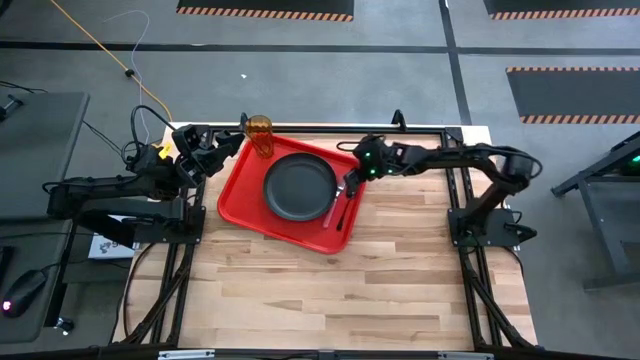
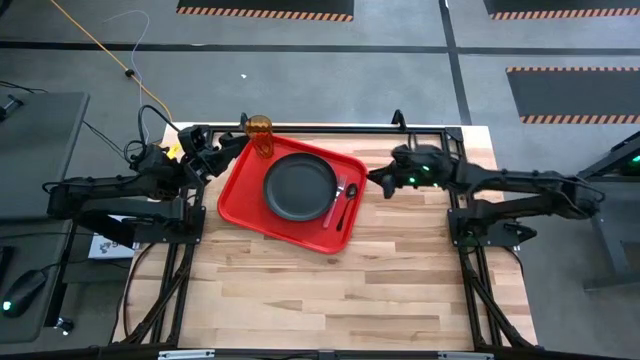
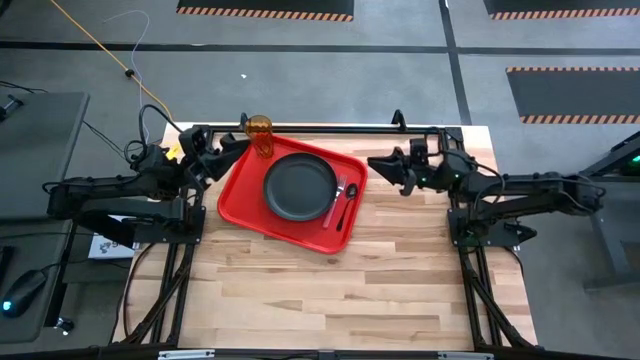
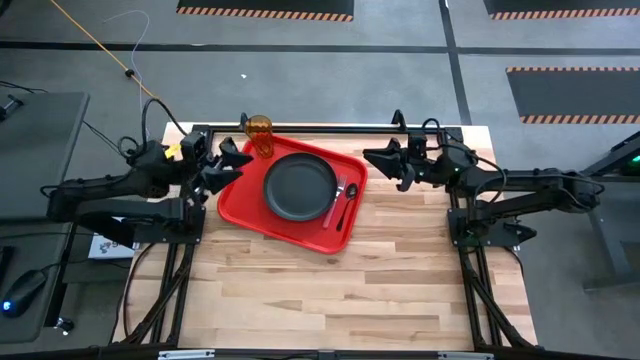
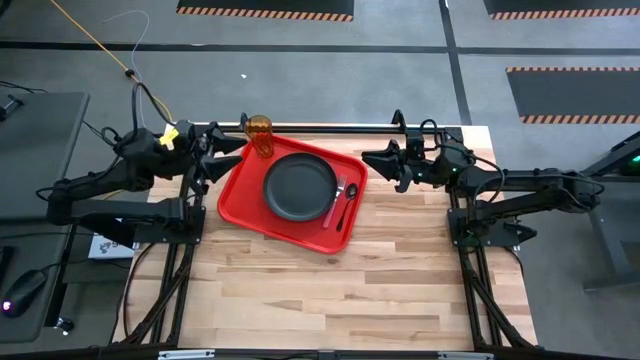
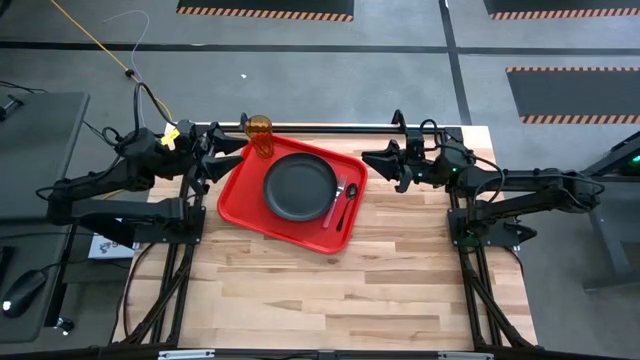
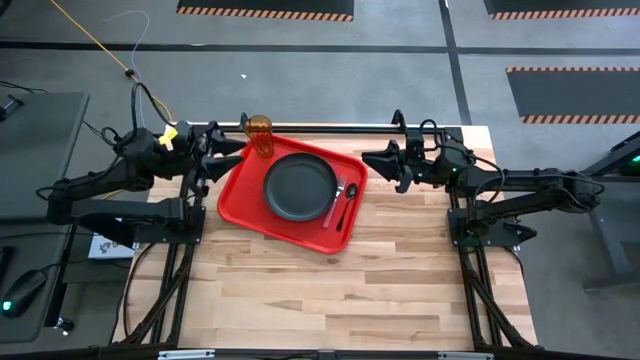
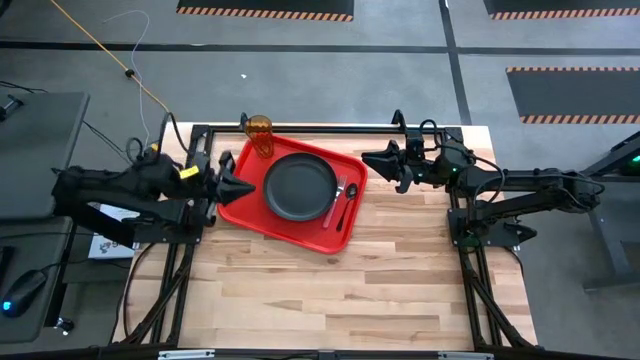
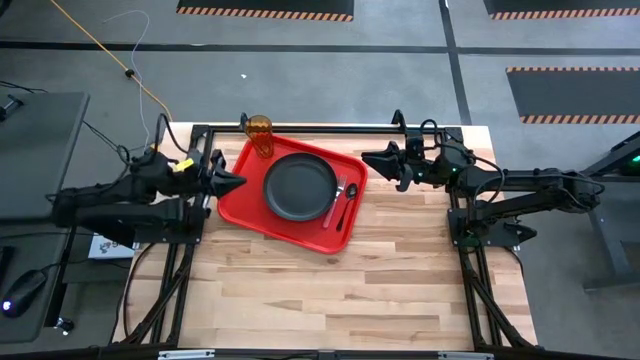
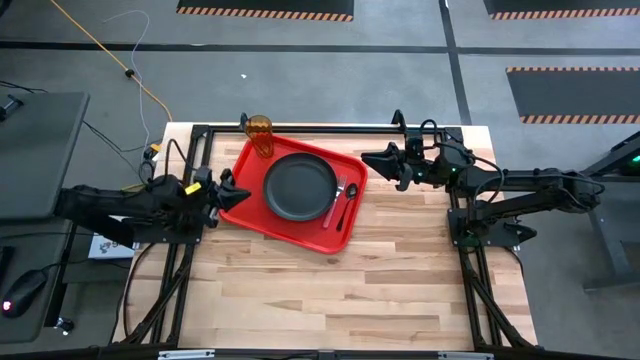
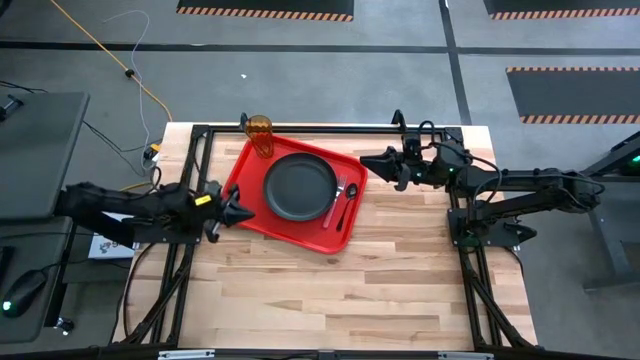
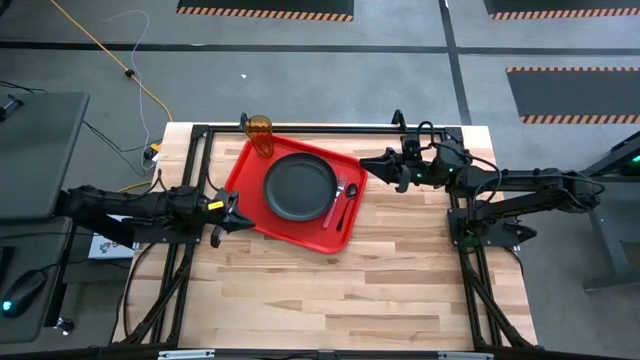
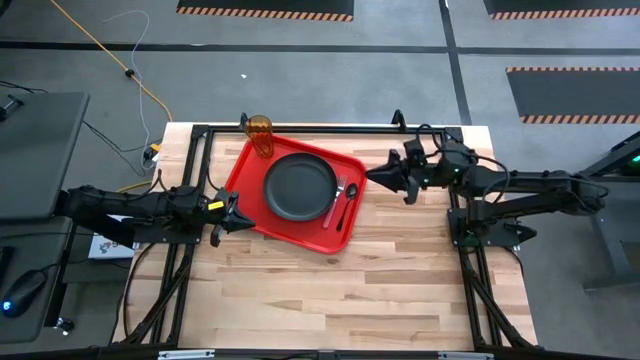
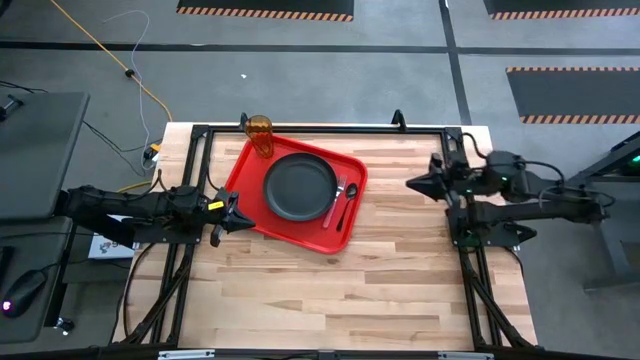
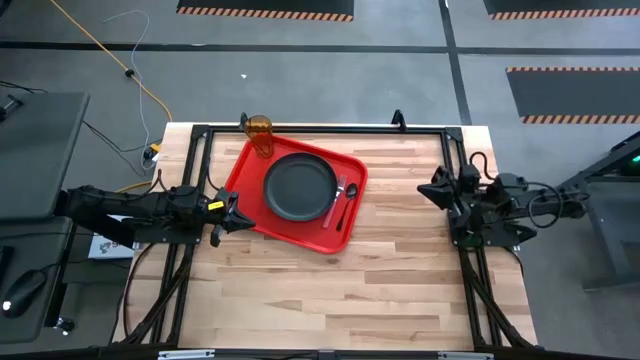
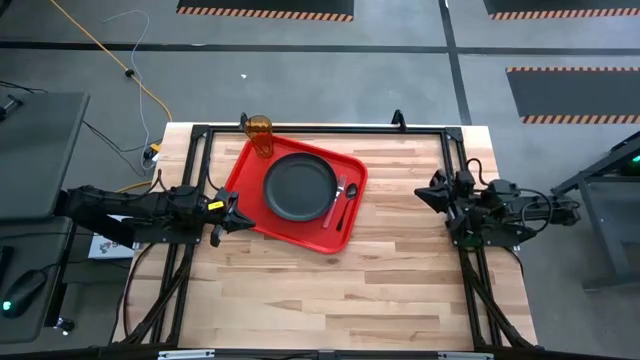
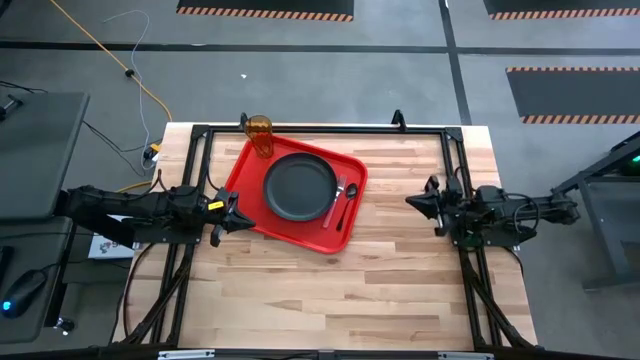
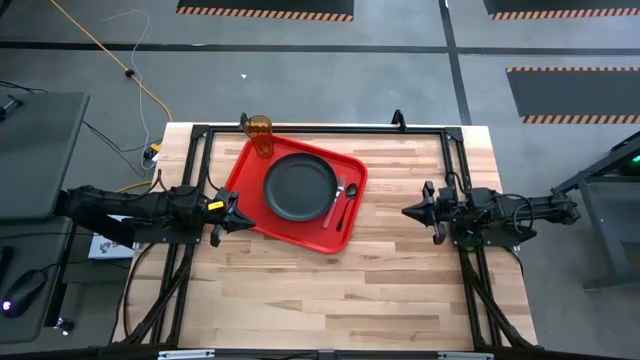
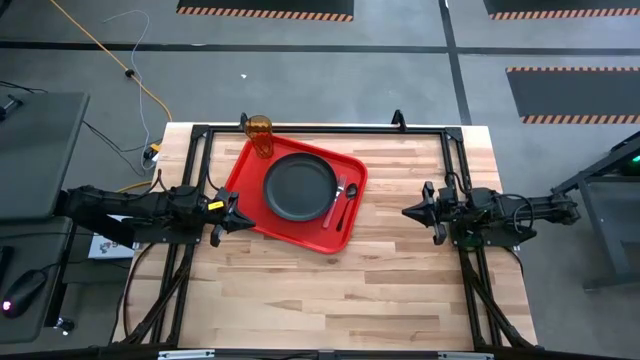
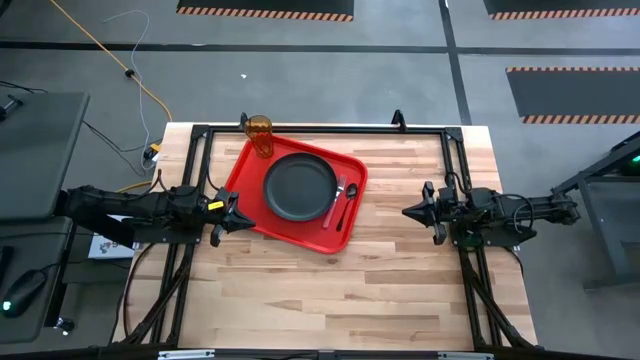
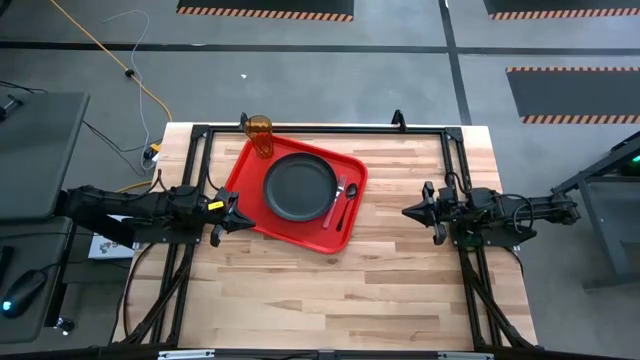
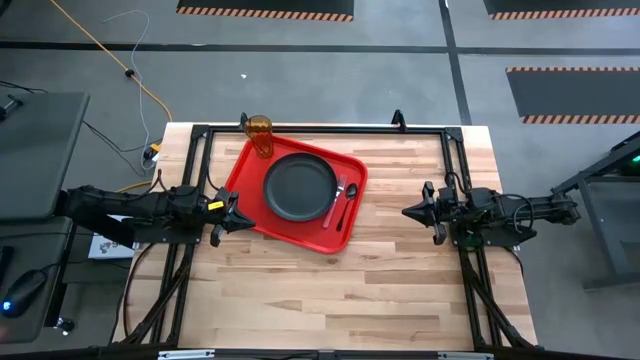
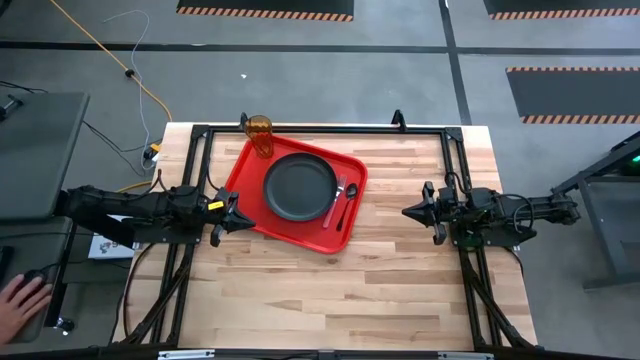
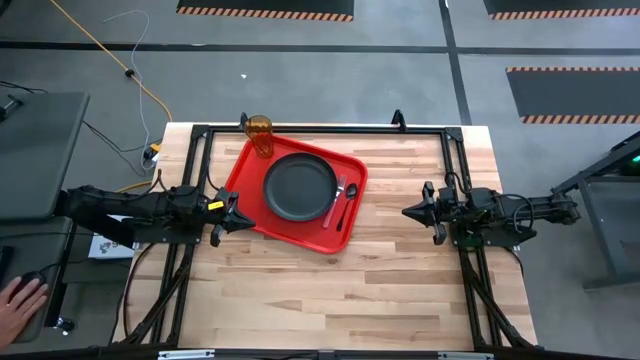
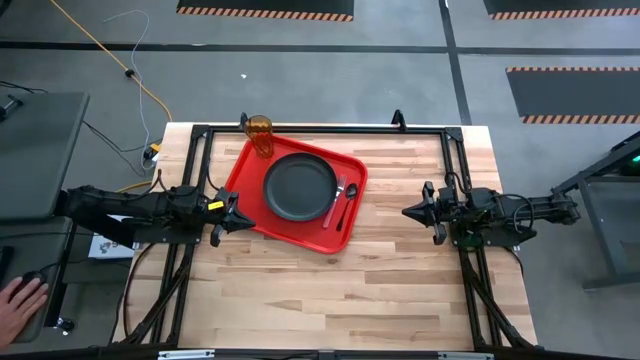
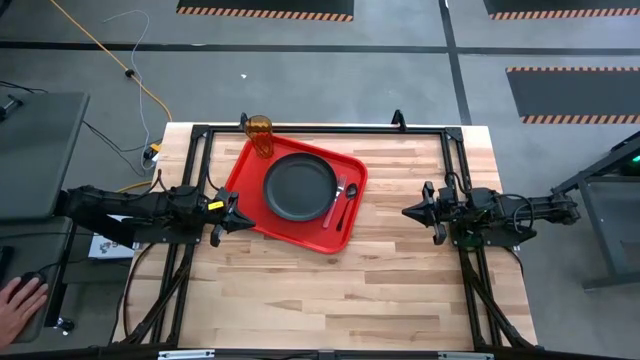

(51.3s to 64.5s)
Task: Pick and place plate/cup/fork/spoon on tray
Return to Home Position

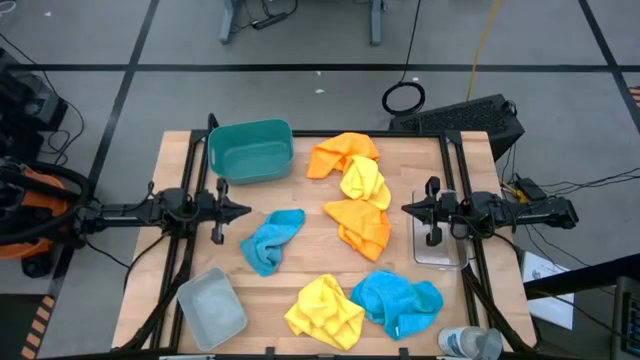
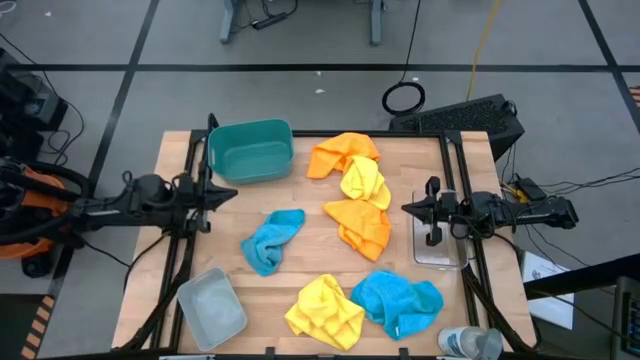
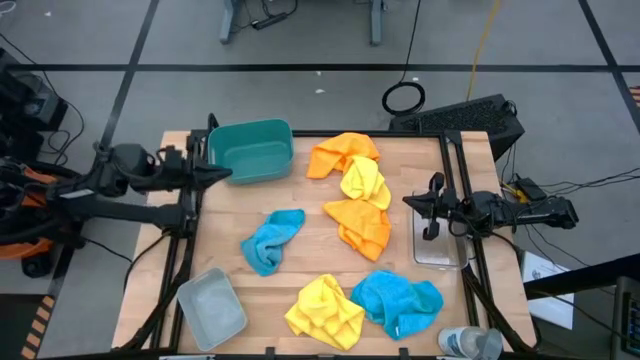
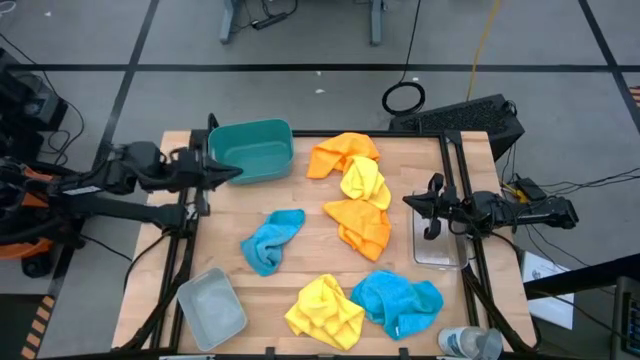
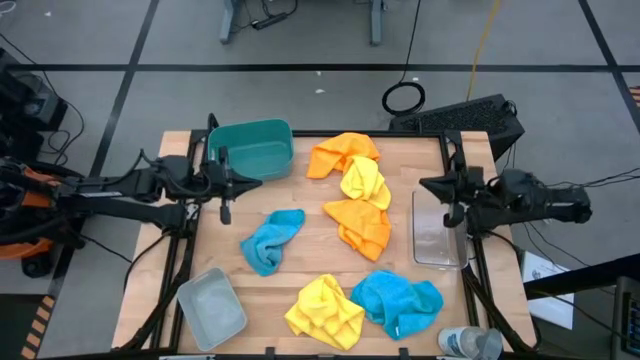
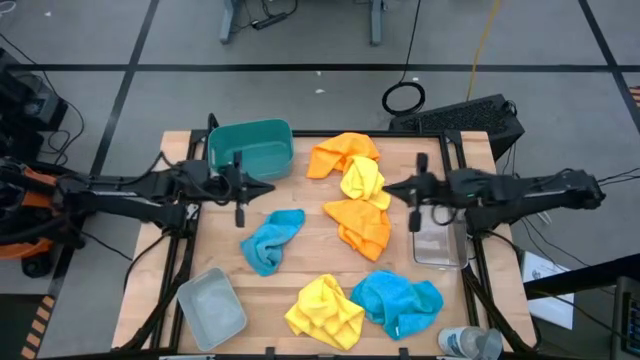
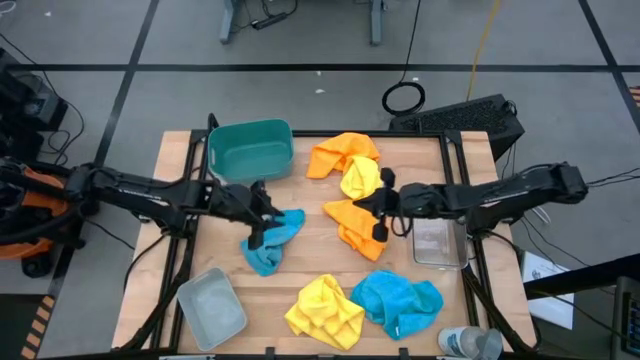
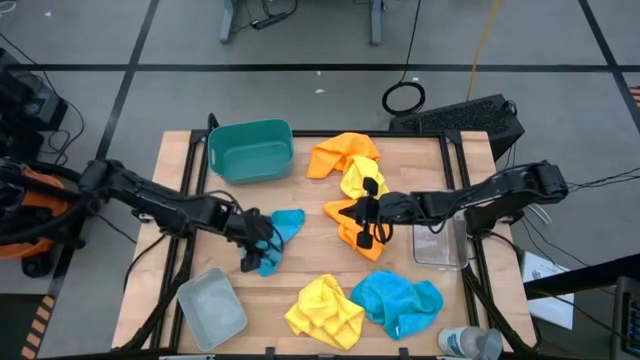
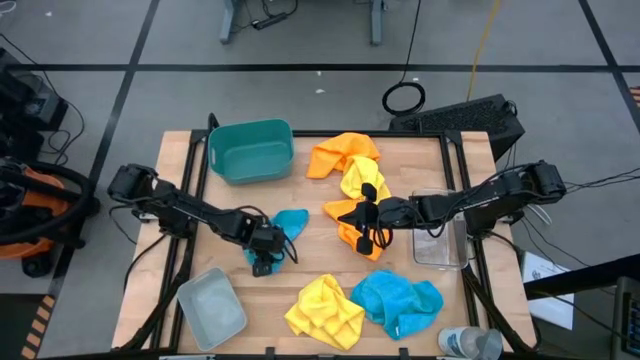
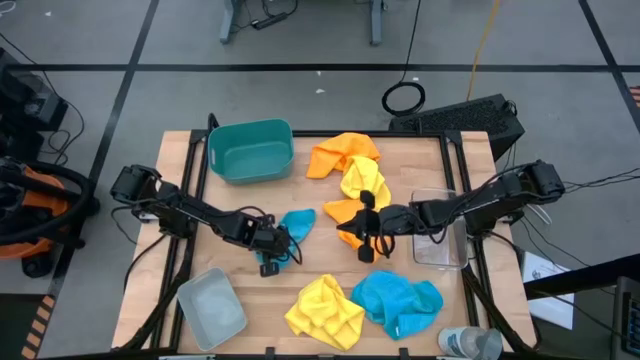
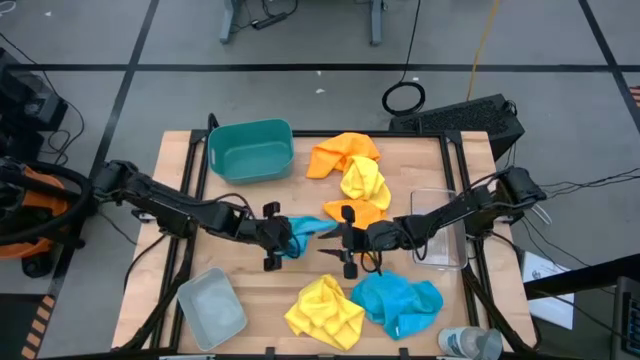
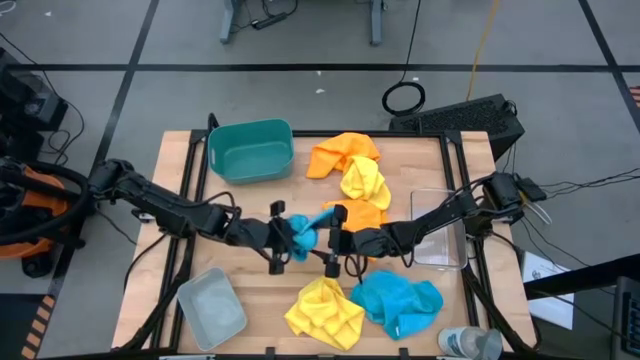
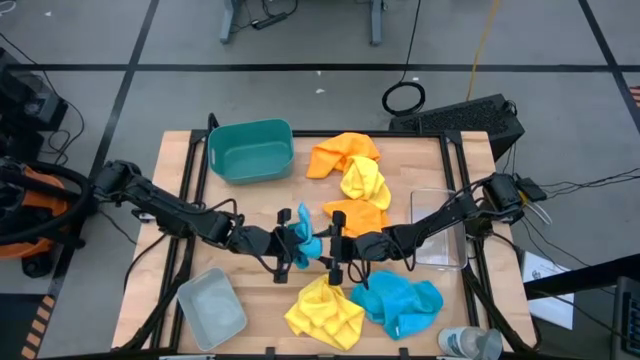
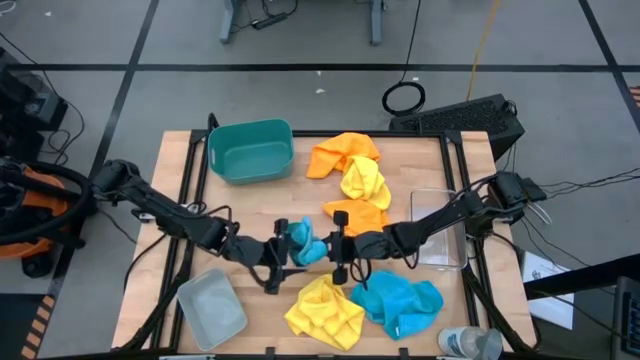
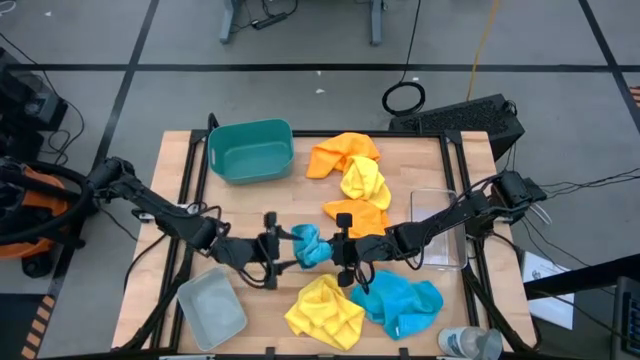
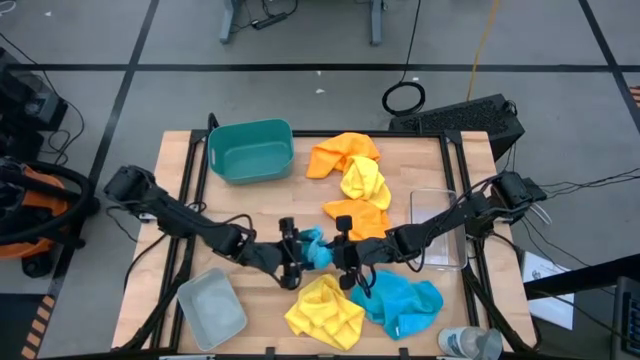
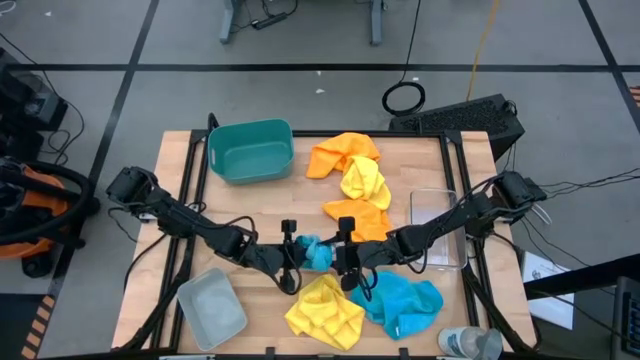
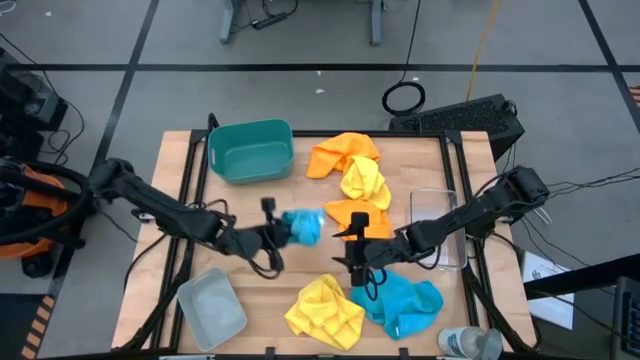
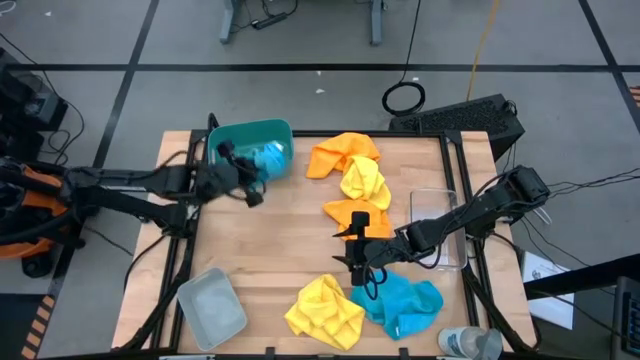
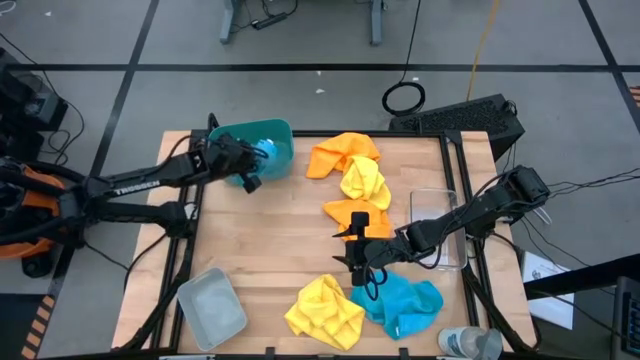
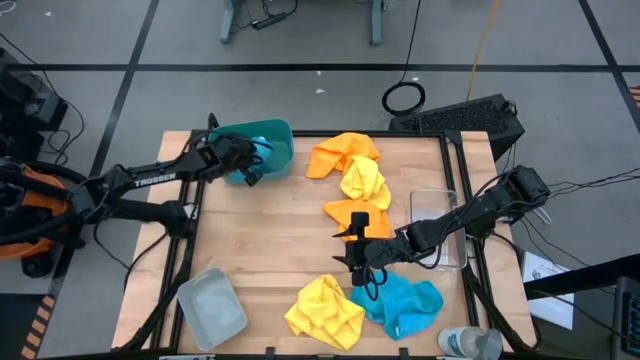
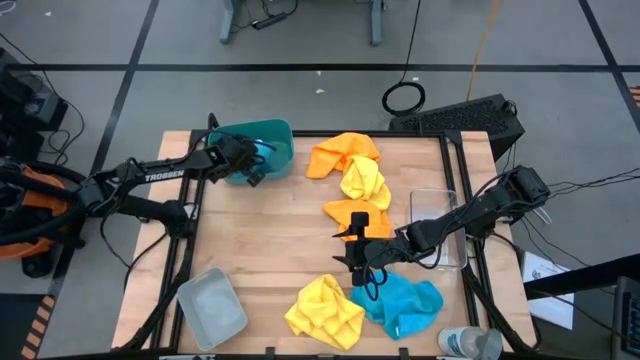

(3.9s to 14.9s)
Task: Sort microfiber towel by color & place in baskets
Put the left blue microfiber cloth into the blue bin
